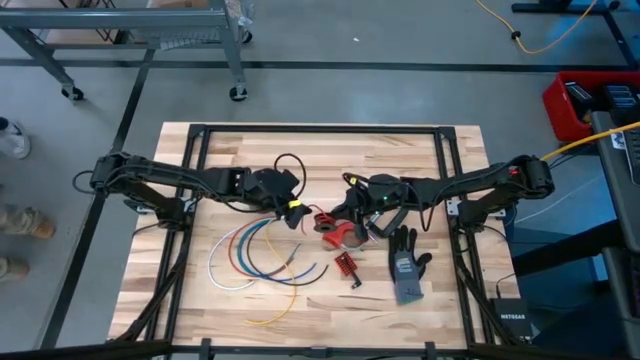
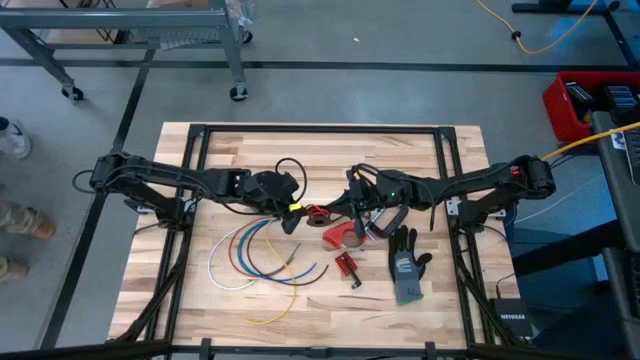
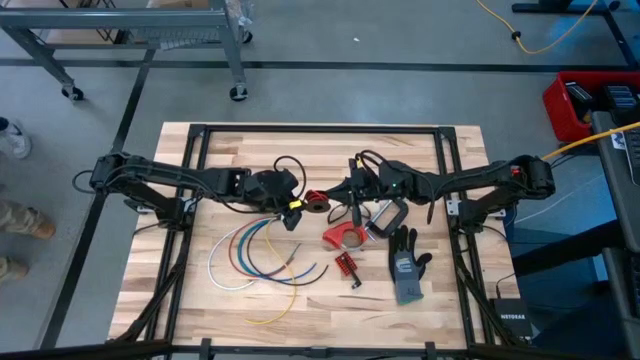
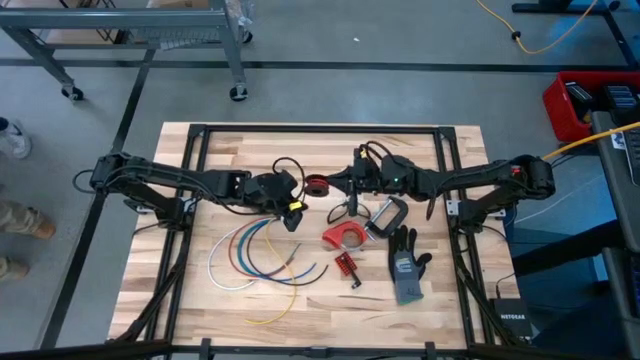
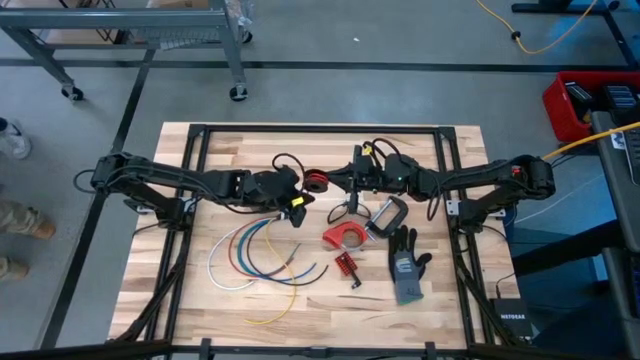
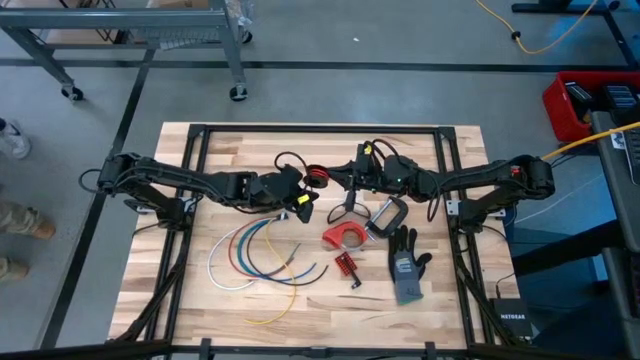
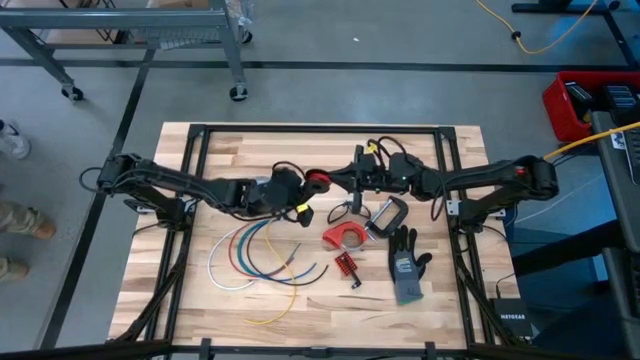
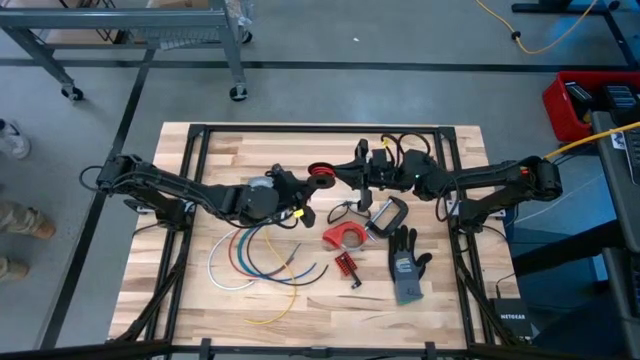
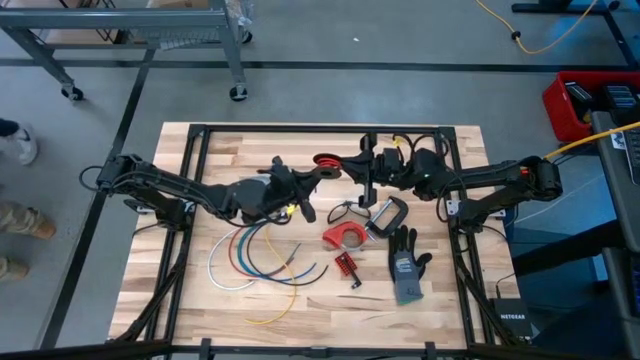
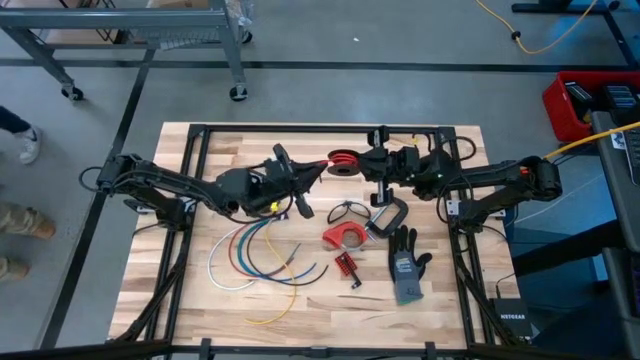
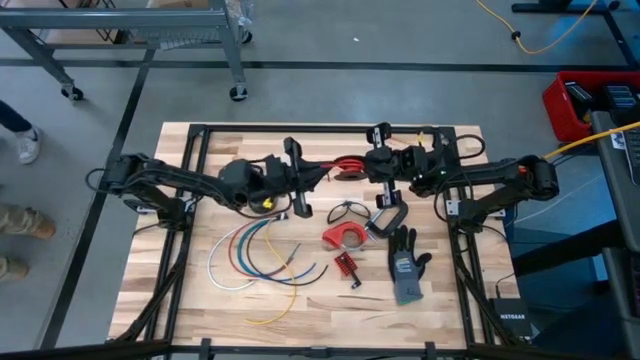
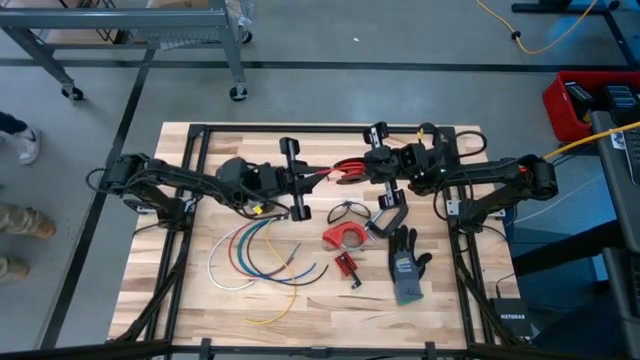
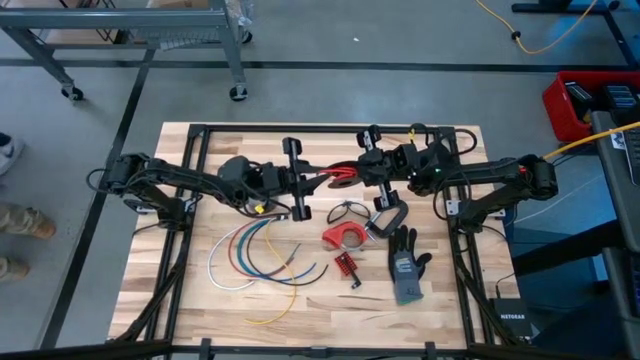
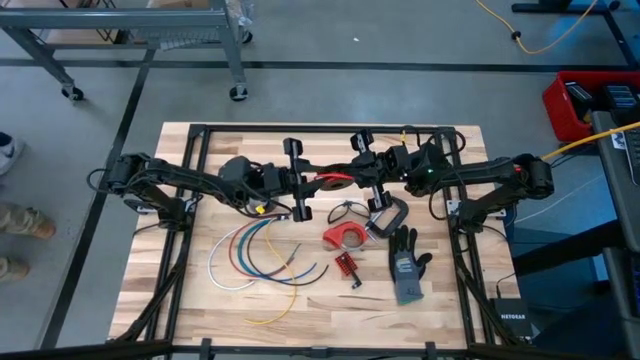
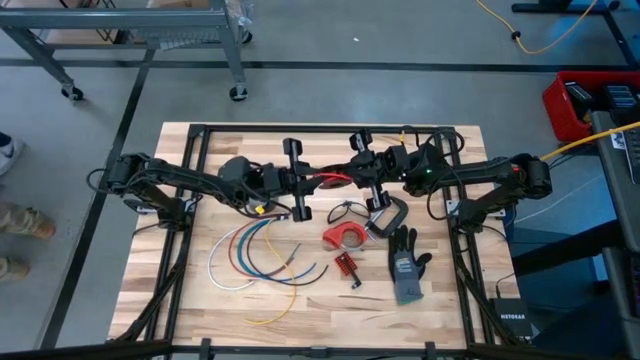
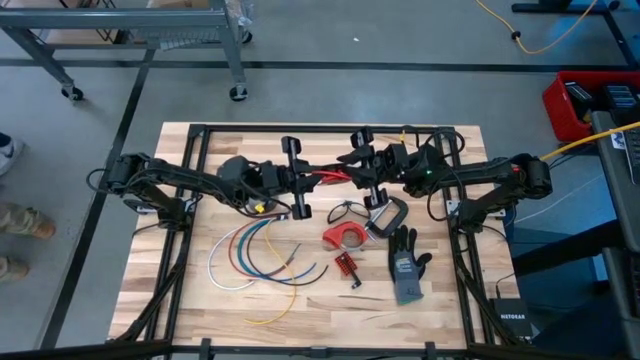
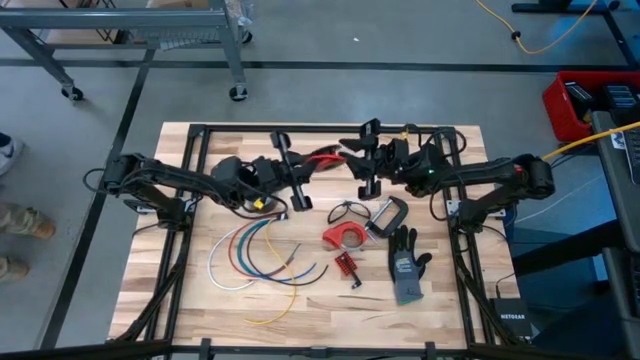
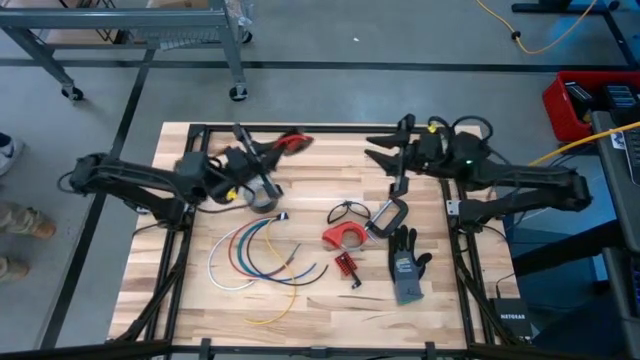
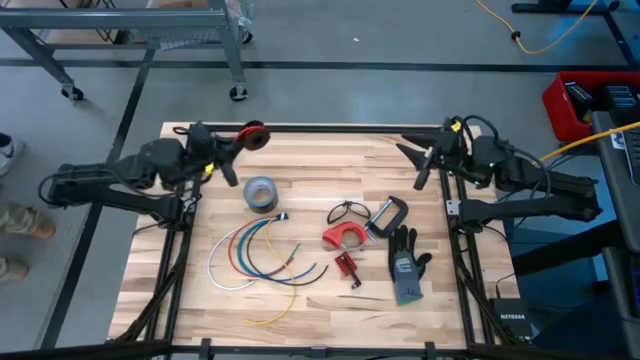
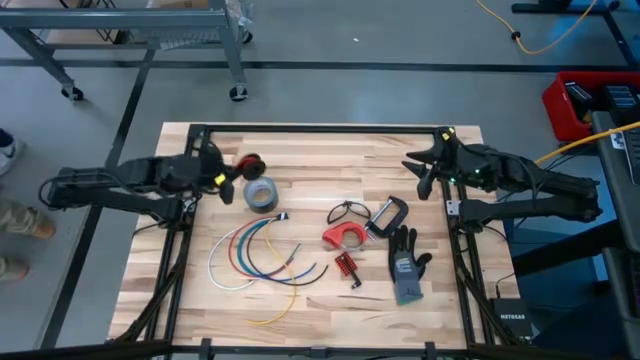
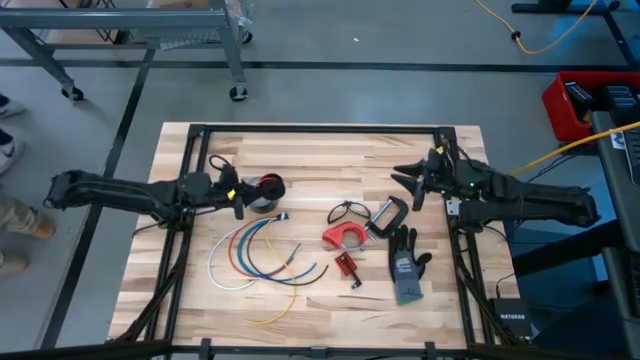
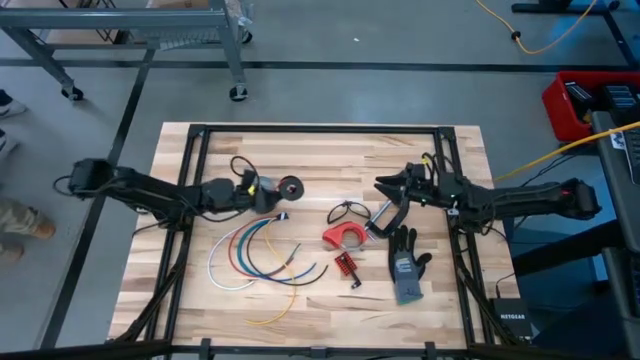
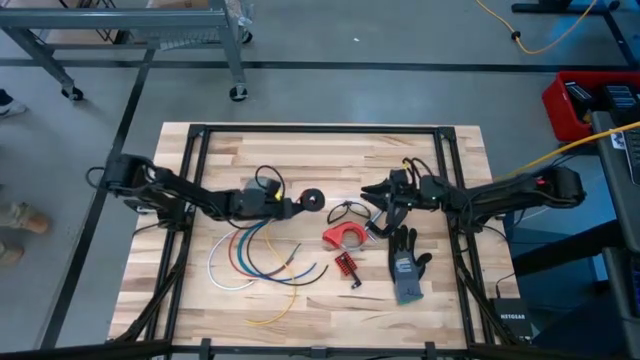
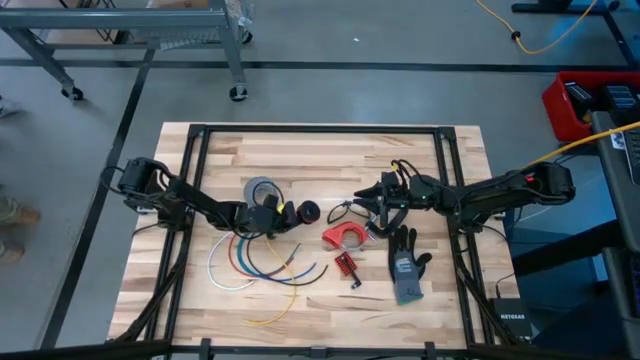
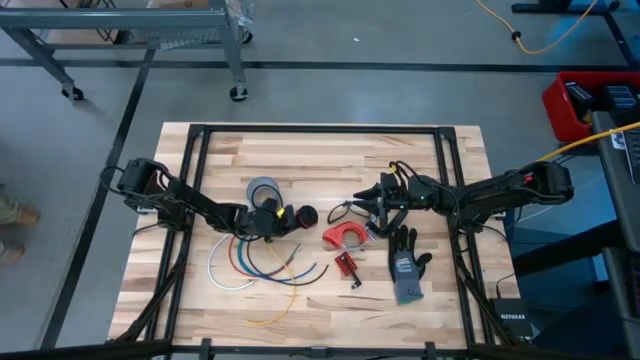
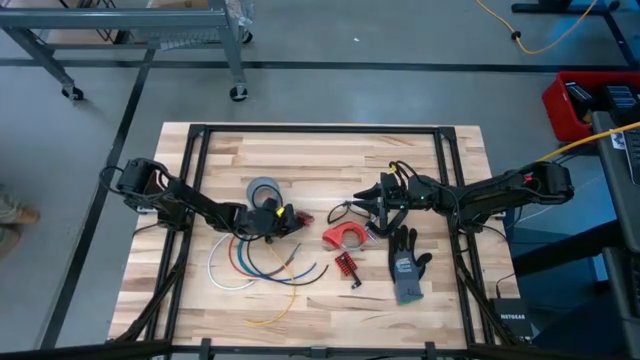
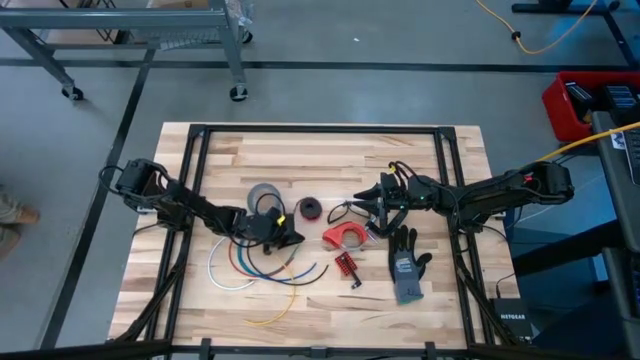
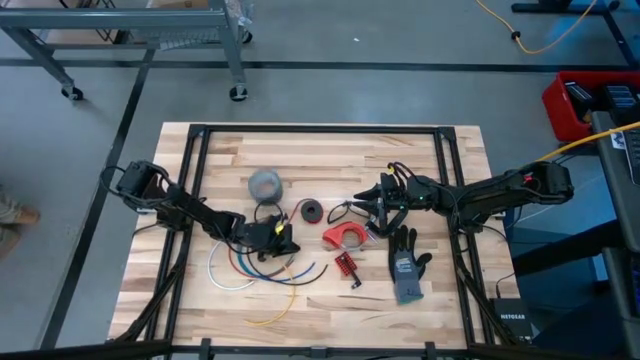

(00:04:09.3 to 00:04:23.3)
Task: Coil cords
Coil the red wire onto the spool

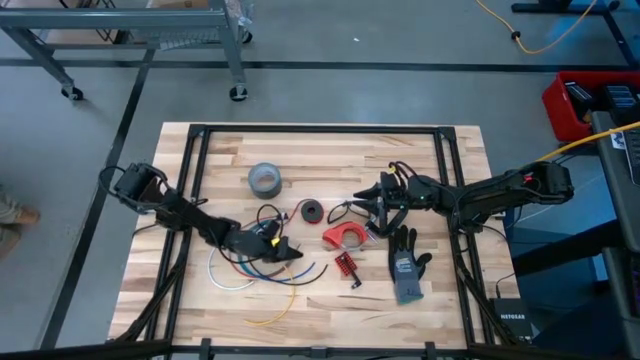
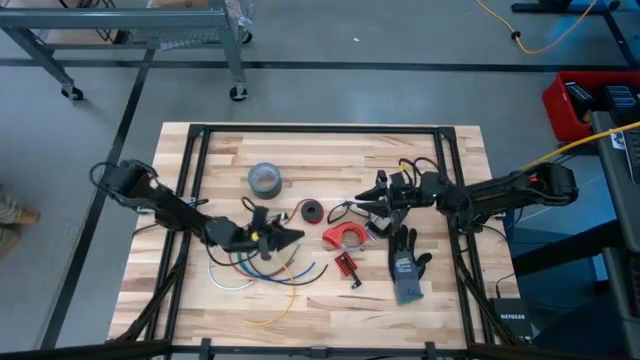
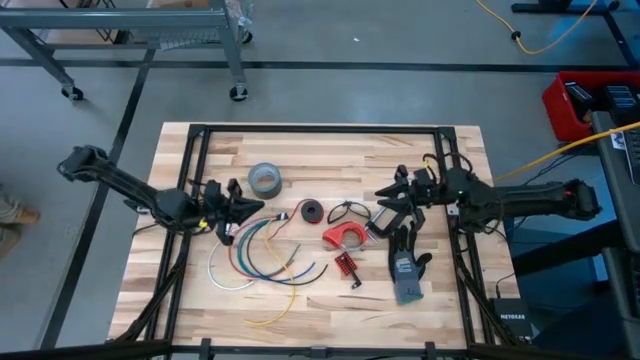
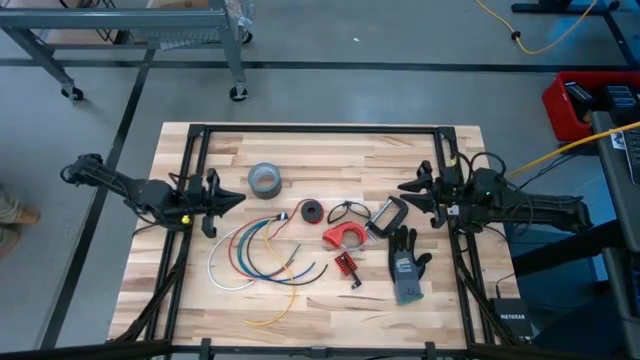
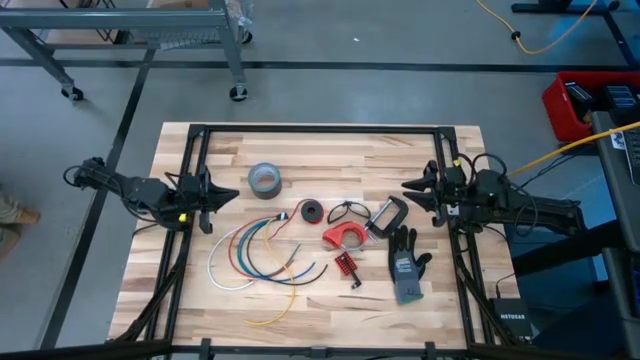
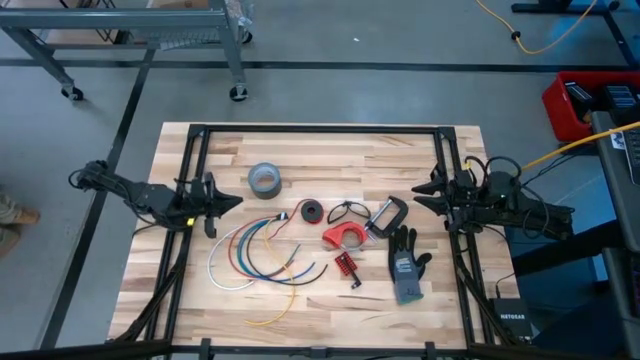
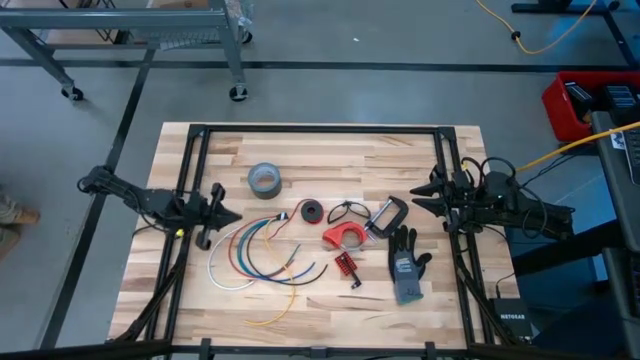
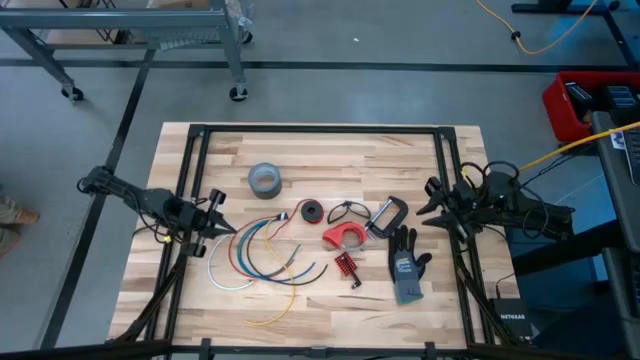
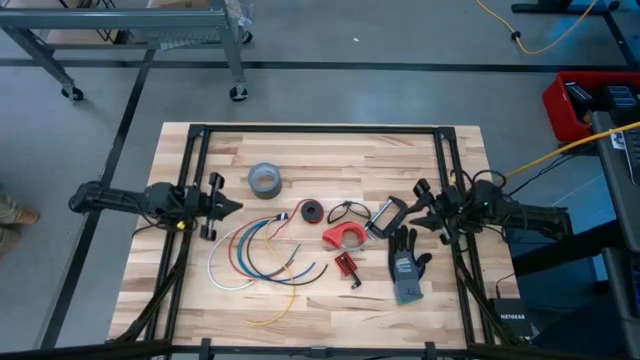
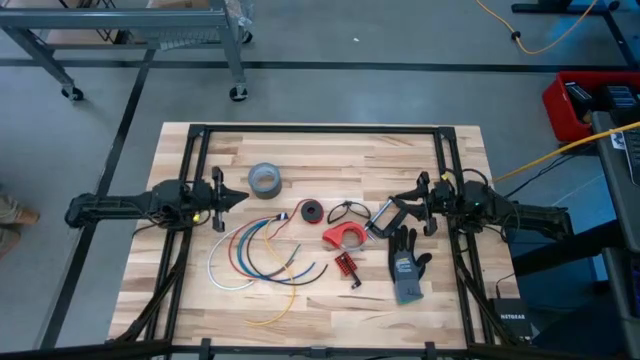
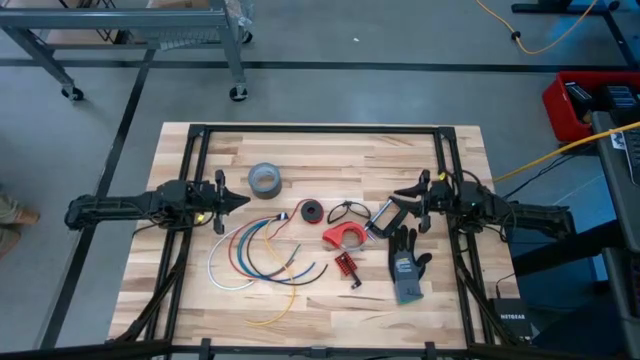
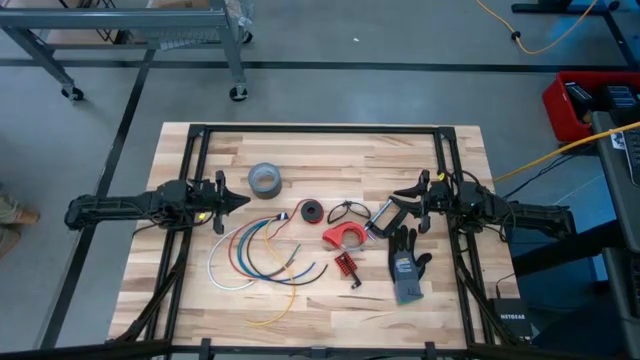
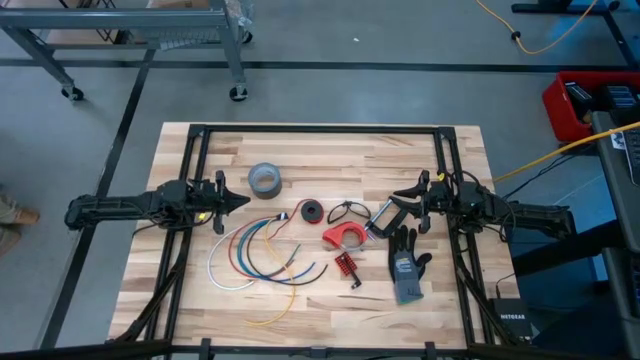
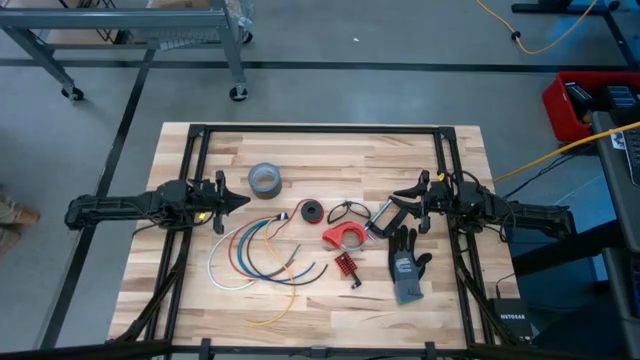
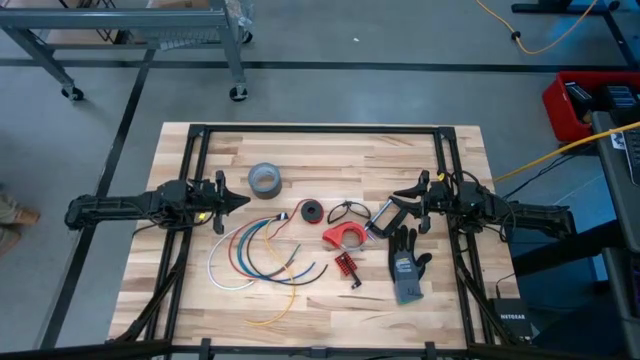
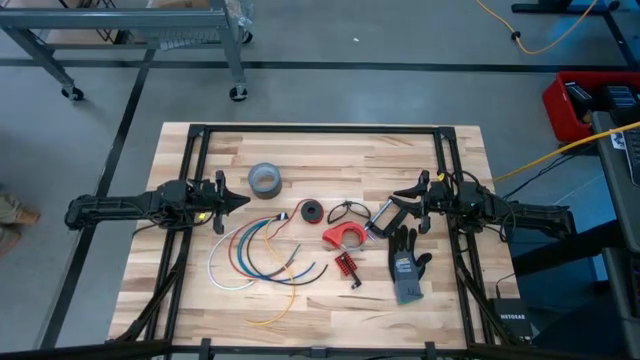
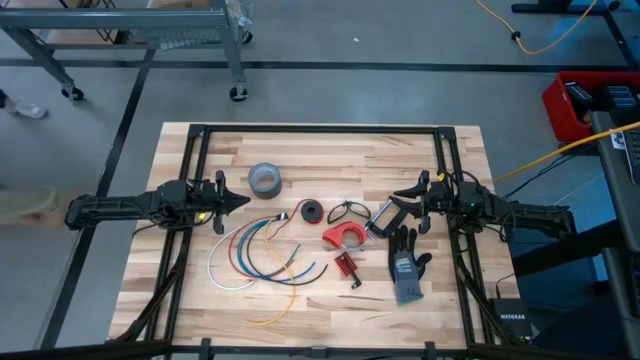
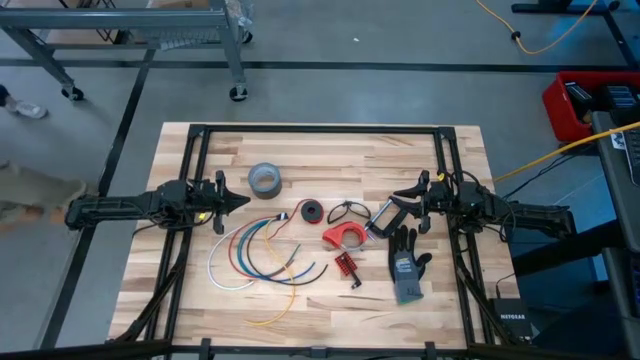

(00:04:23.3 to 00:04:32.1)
Return to Home Position
